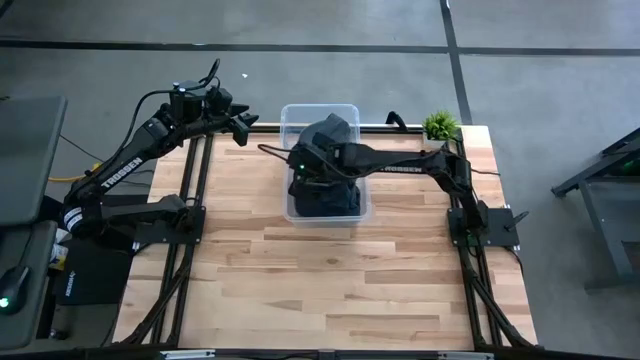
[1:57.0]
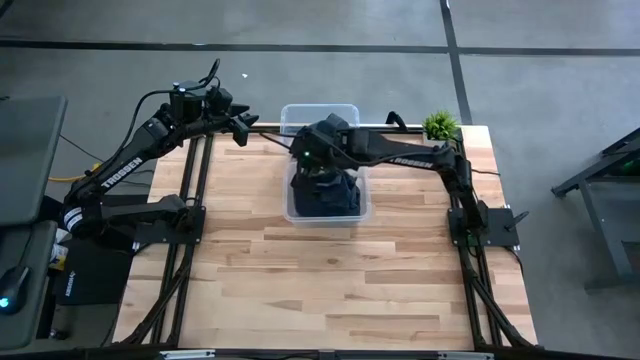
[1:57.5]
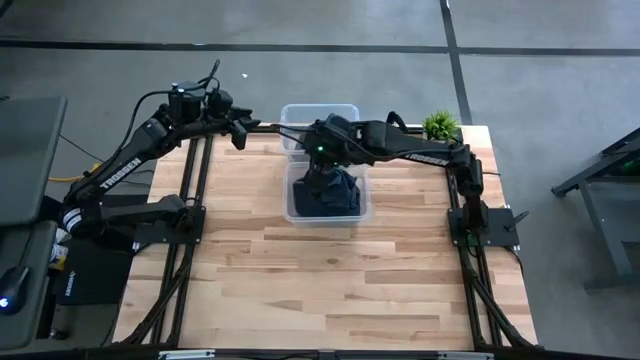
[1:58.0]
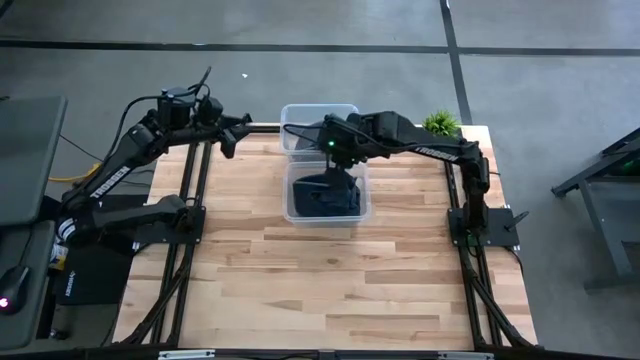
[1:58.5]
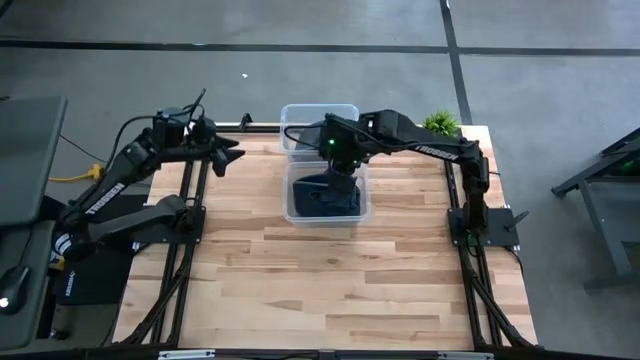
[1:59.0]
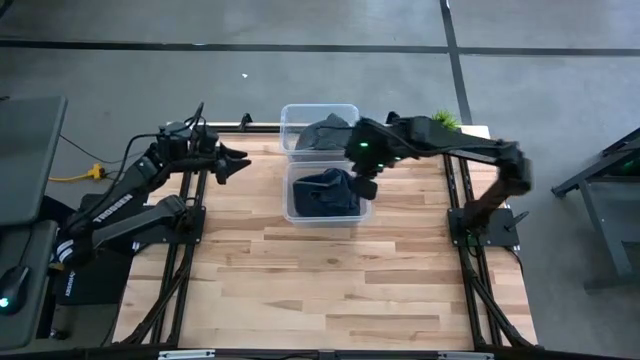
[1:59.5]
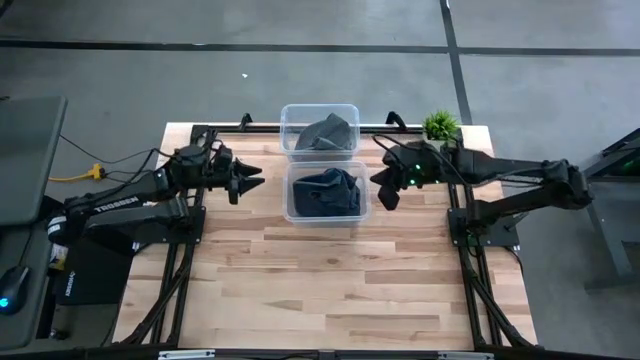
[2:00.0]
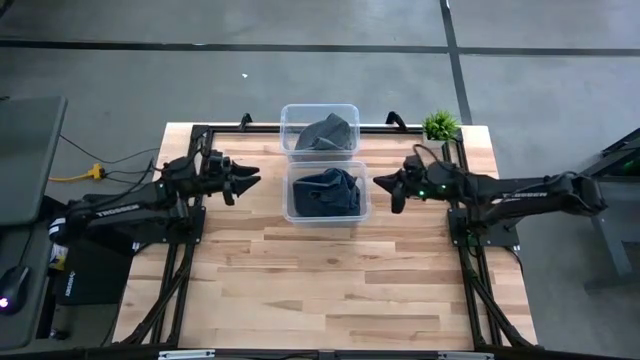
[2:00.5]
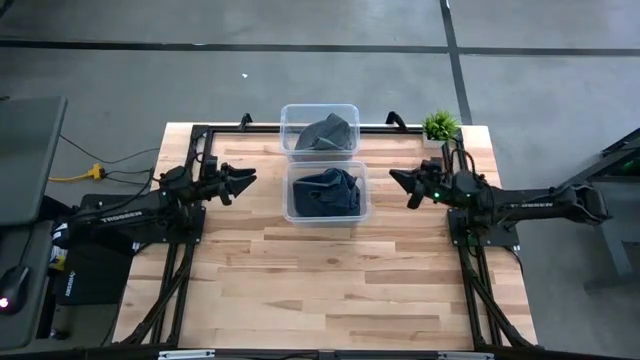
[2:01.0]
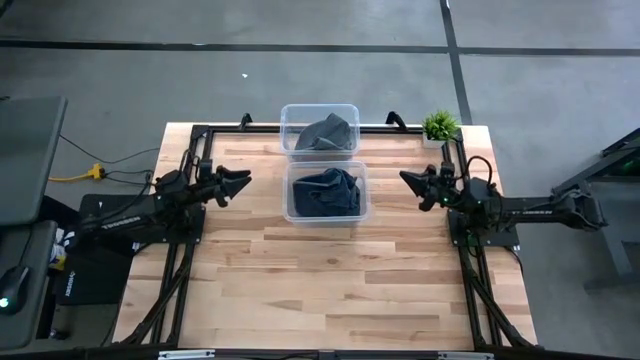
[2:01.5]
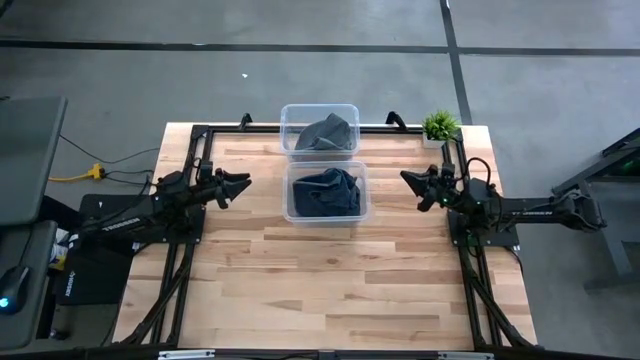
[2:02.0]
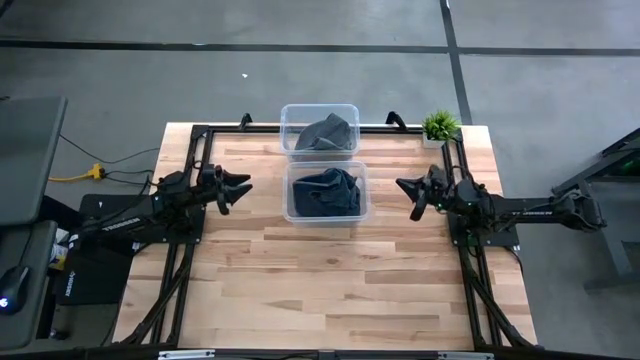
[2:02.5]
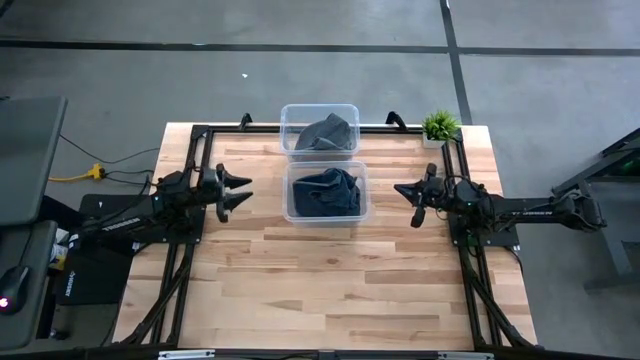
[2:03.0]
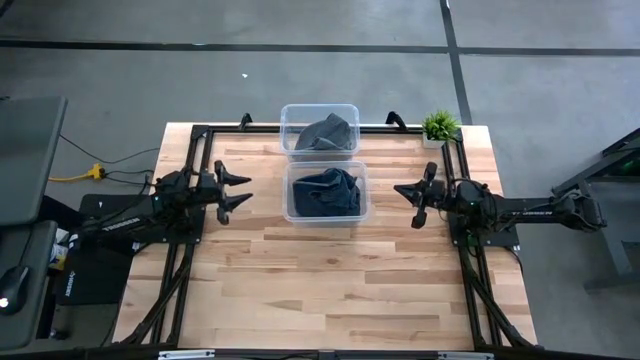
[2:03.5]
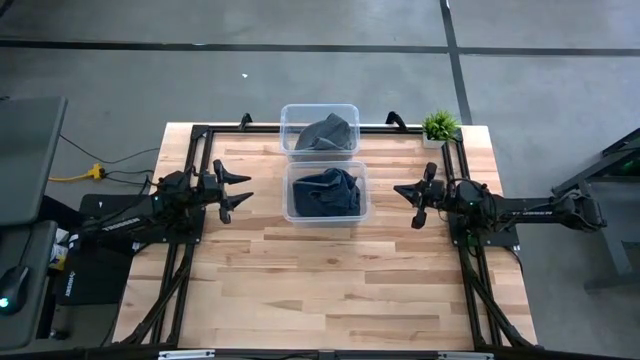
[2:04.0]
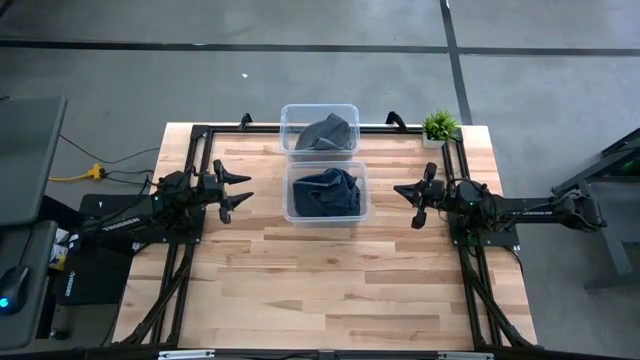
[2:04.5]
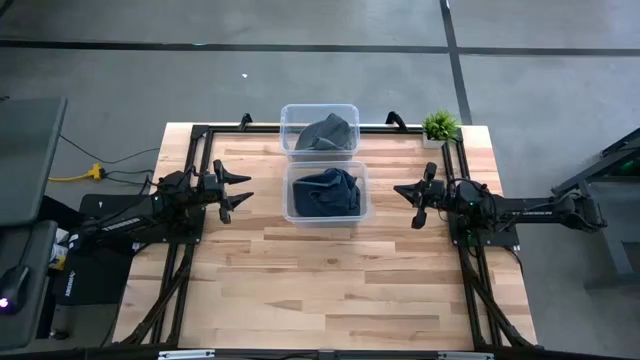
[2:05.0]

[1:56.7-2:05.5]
Task: Pick & Place hat
Return to Home Position

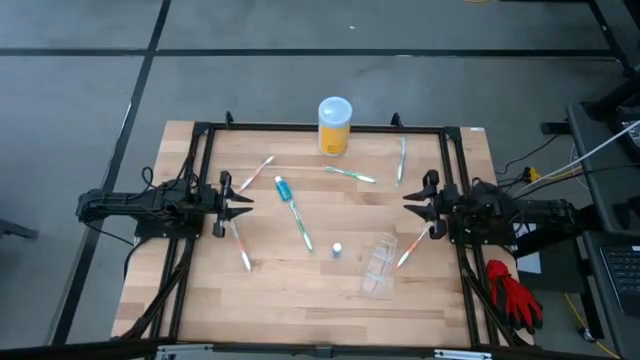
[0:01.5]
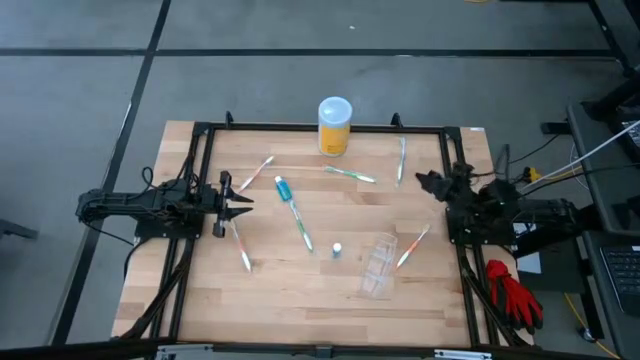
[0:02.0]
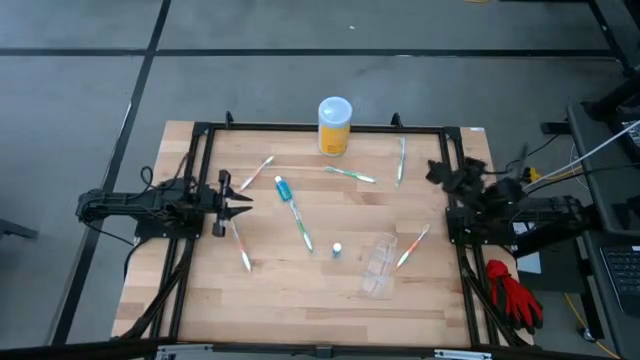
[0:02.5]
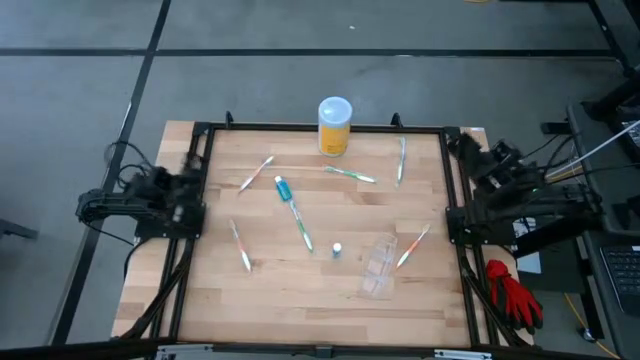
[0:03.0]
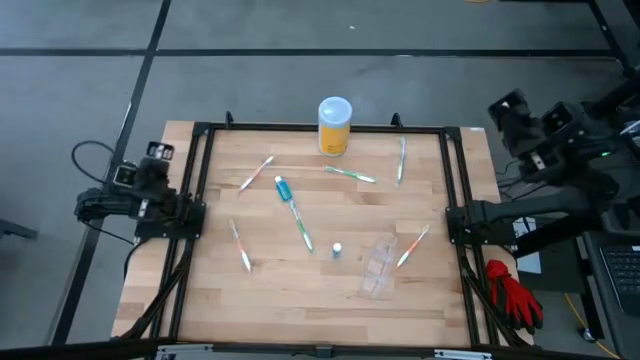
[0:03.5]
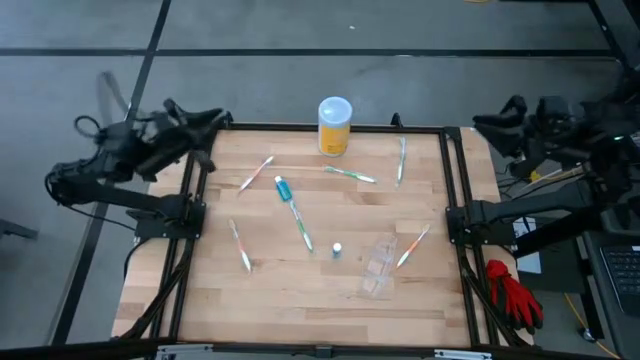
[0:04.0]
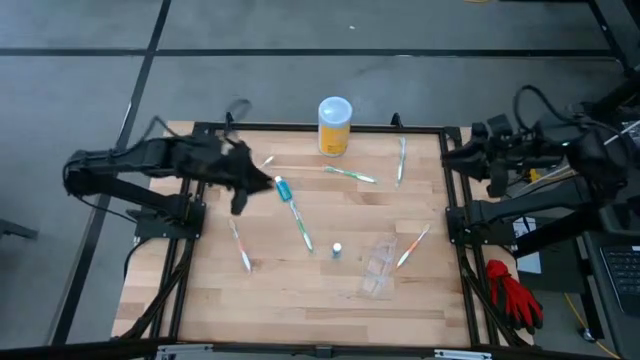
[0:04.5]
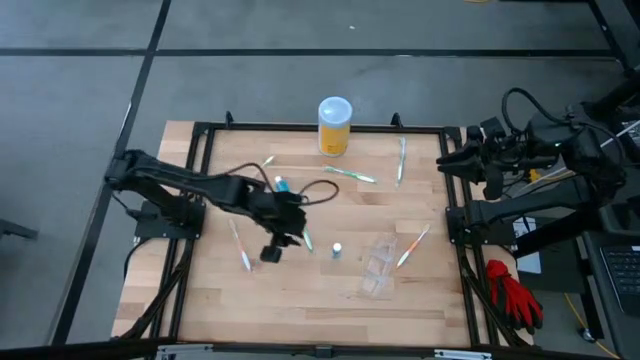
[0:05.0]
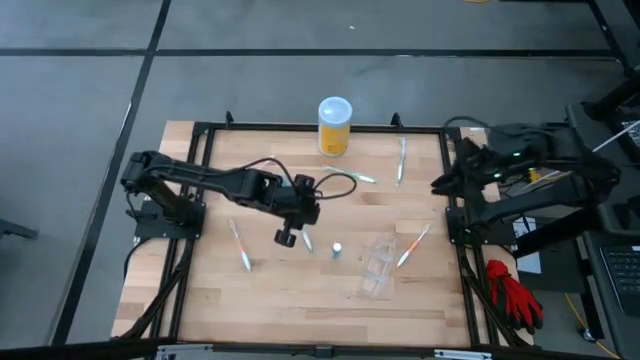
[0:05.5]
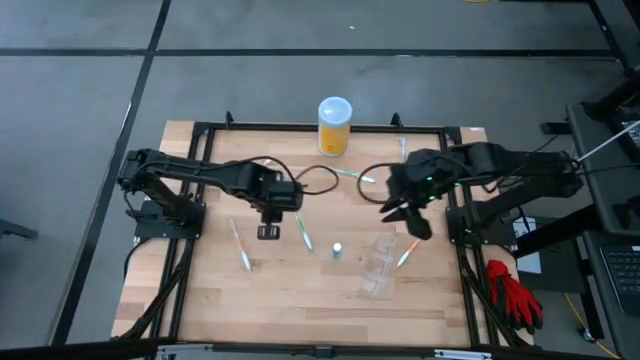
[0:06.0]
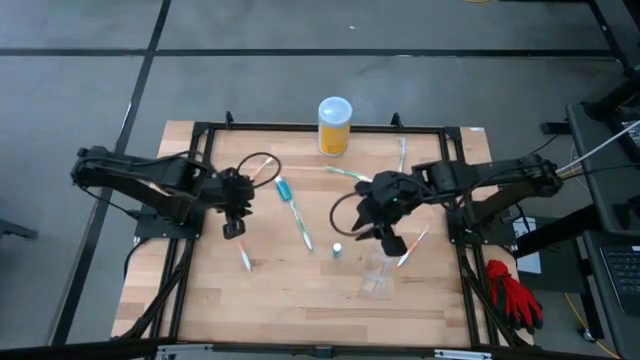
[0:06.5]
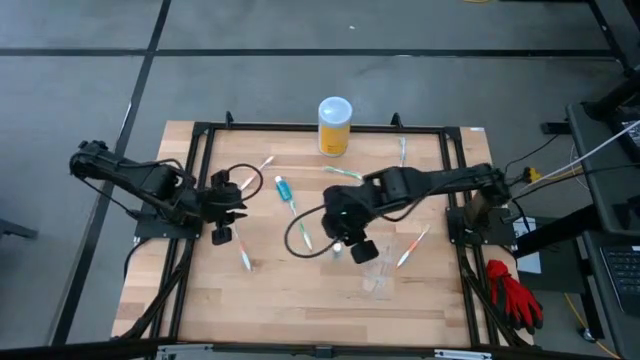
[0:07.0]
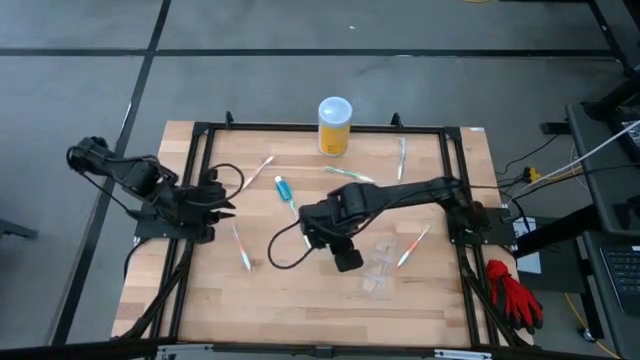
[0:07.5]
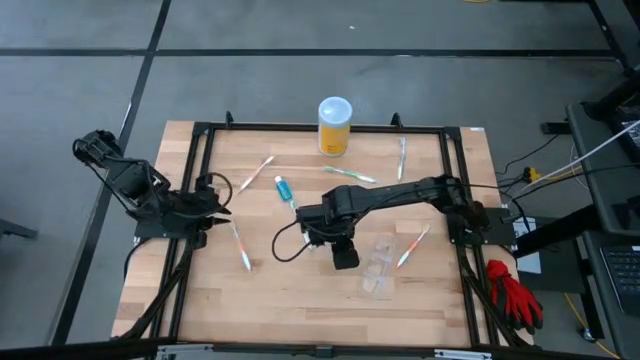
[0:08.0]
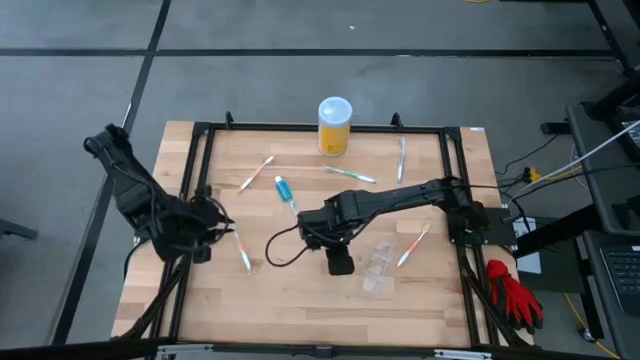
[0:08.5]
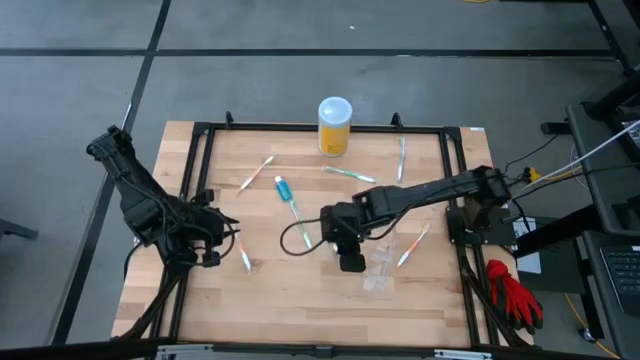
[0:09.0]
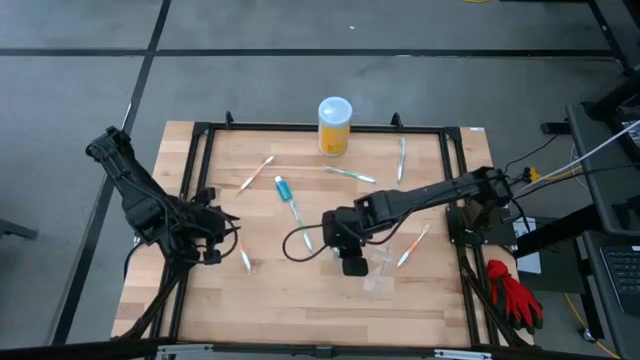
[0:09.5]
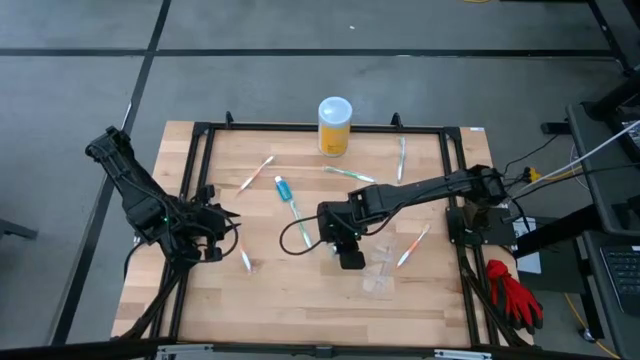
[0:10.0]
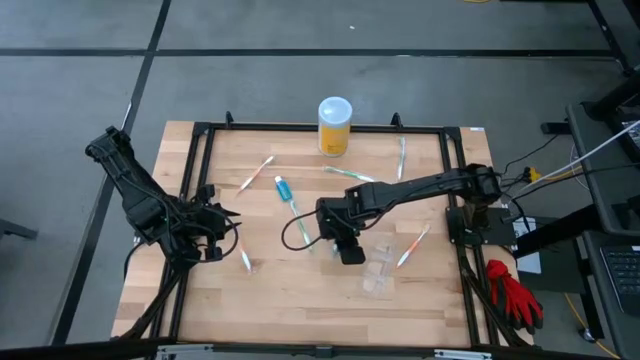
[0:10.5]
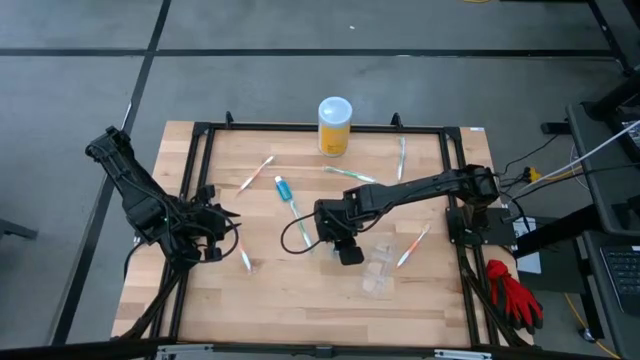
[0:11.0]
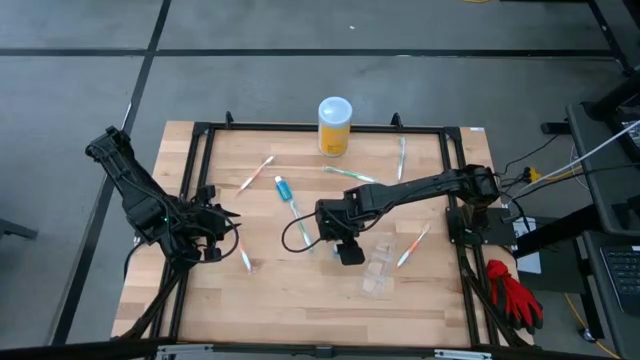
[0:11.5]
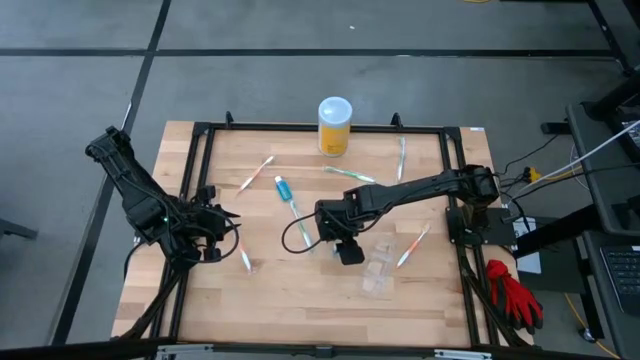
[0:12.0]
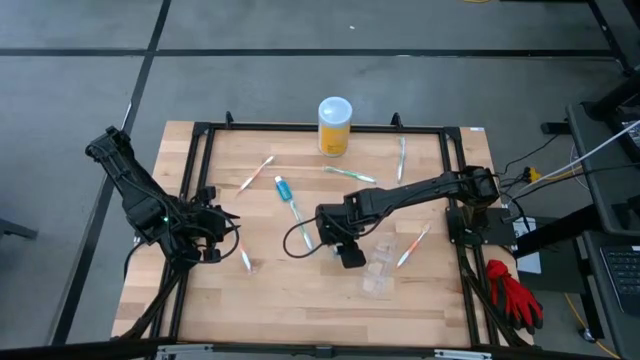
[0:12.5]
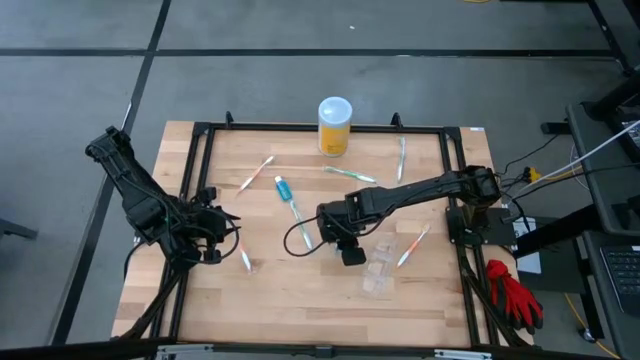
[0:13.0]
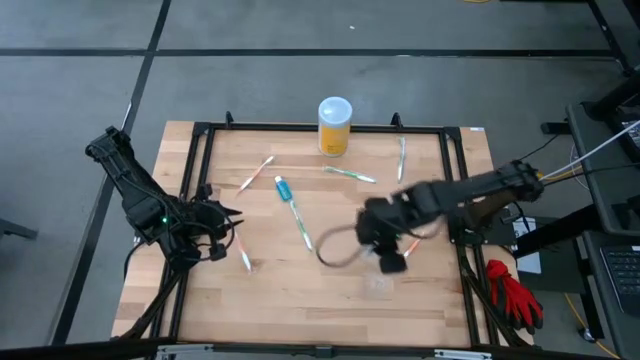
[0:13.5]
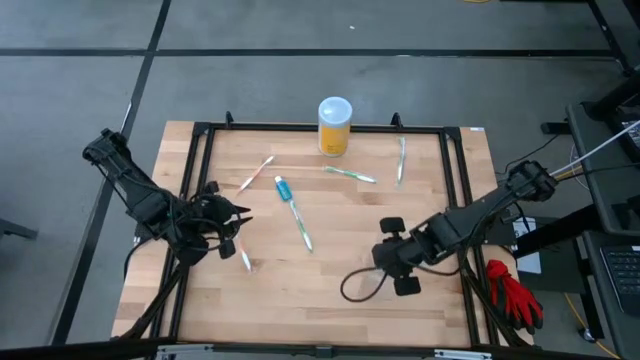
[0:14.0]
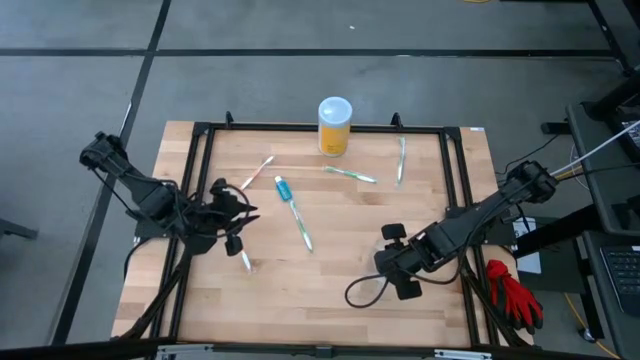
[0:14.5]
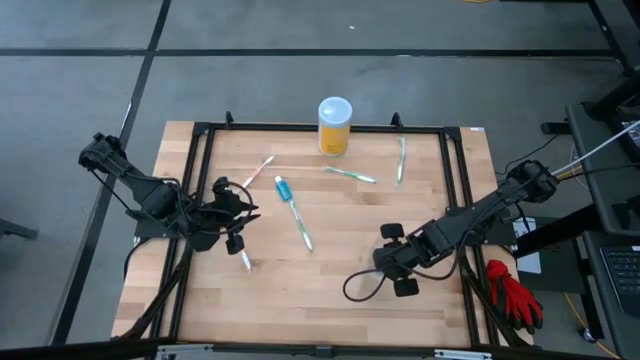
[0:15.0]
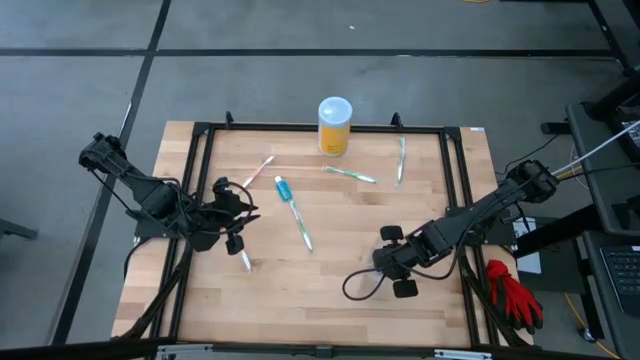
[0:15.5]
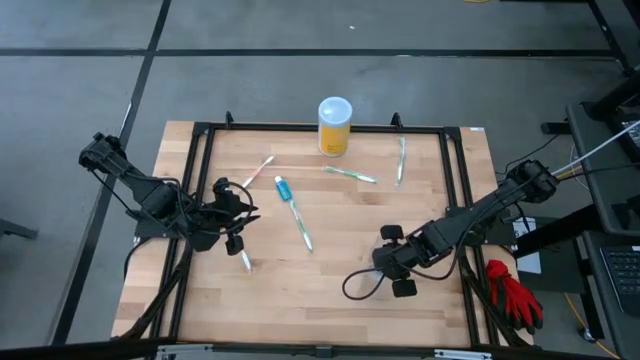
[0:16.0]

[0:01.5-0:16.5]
Task: Pick & Place toothbrushing station
Put the bottom blue mouthwash bottle into the transparent organizer
